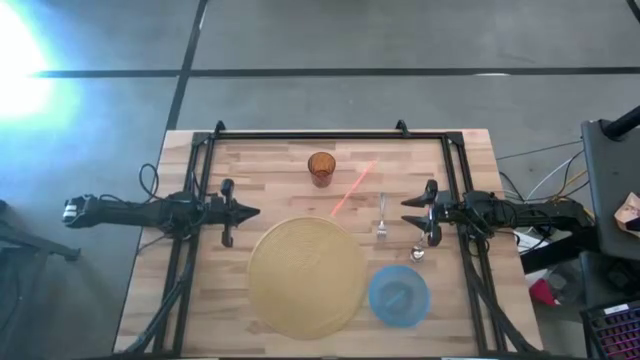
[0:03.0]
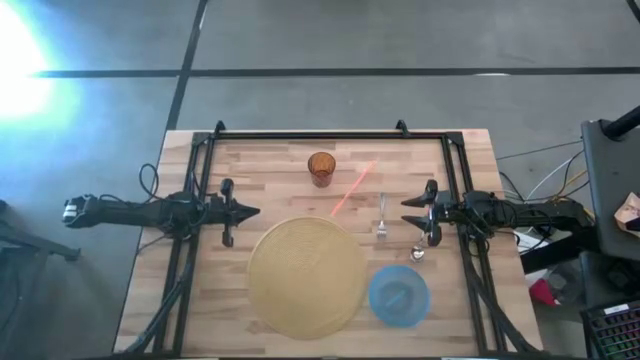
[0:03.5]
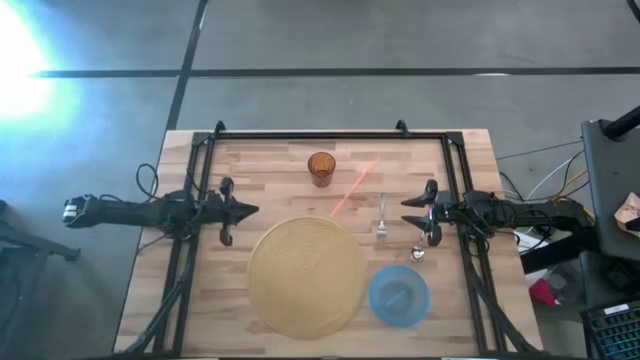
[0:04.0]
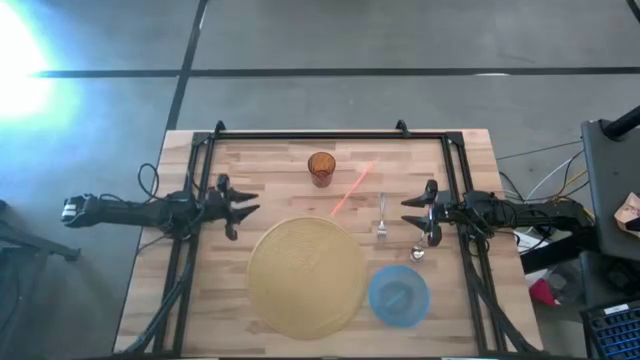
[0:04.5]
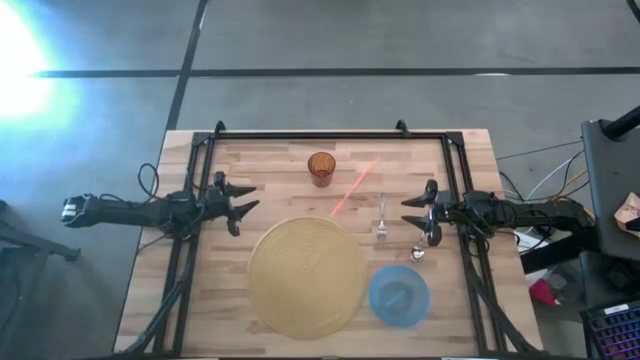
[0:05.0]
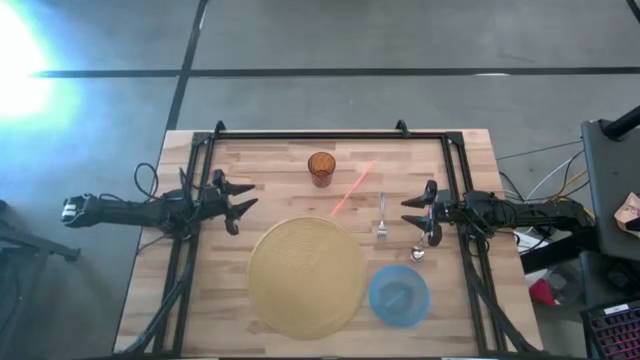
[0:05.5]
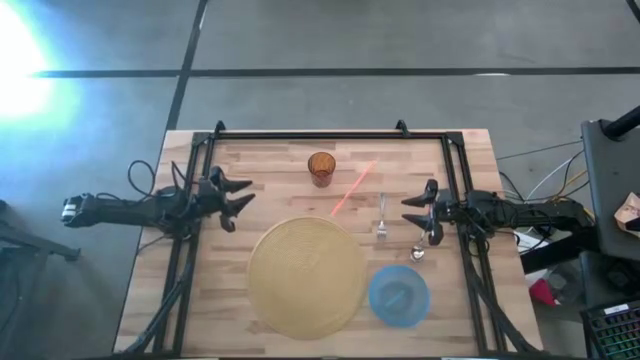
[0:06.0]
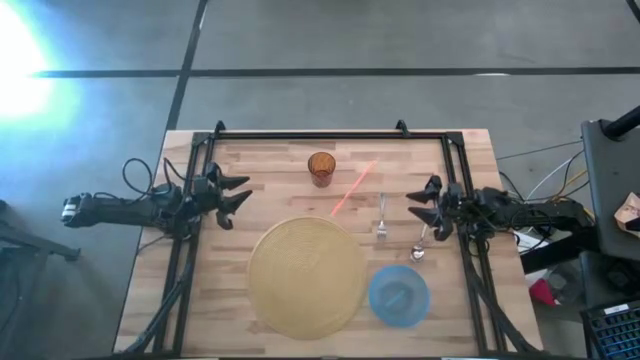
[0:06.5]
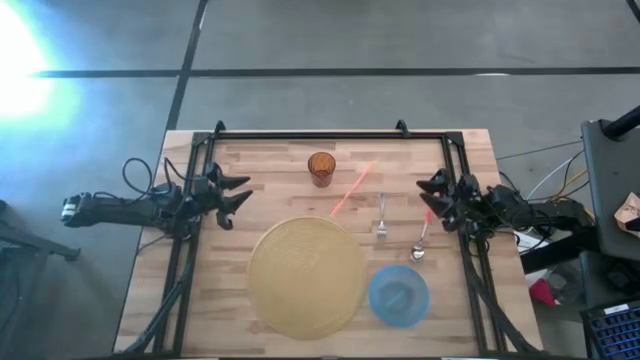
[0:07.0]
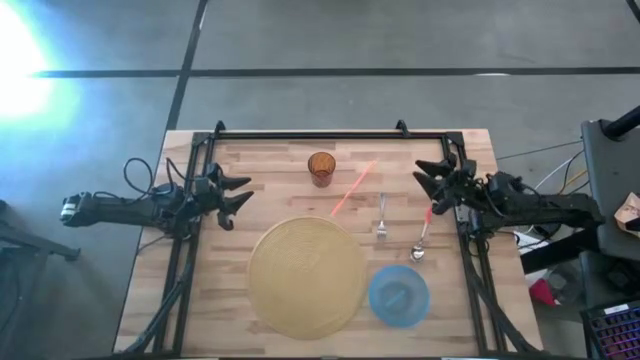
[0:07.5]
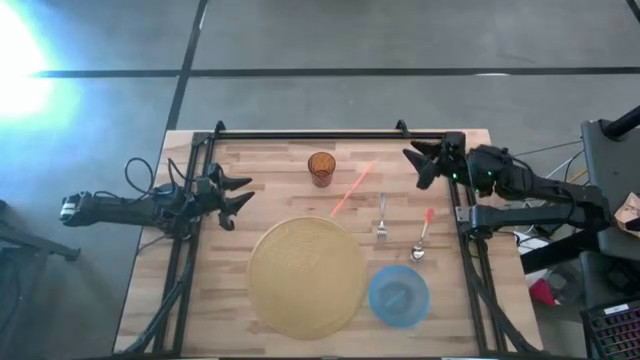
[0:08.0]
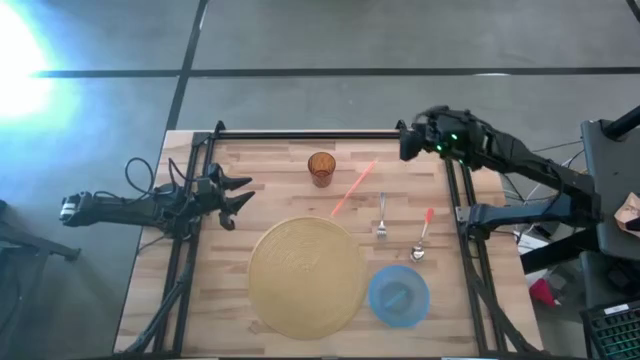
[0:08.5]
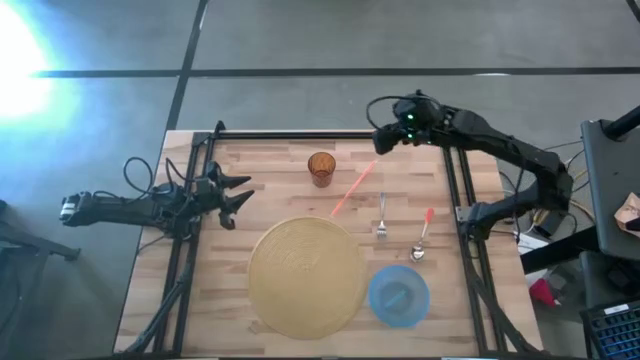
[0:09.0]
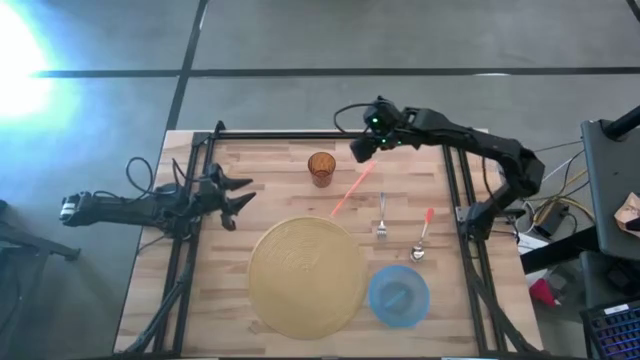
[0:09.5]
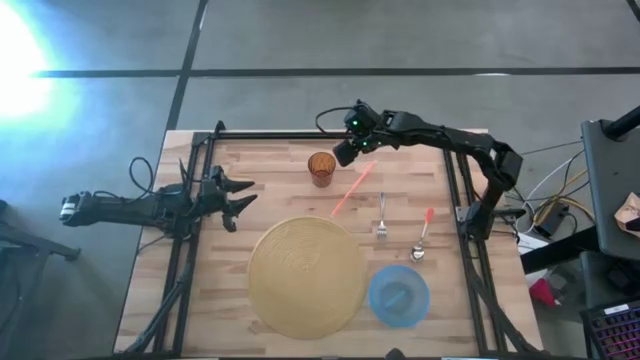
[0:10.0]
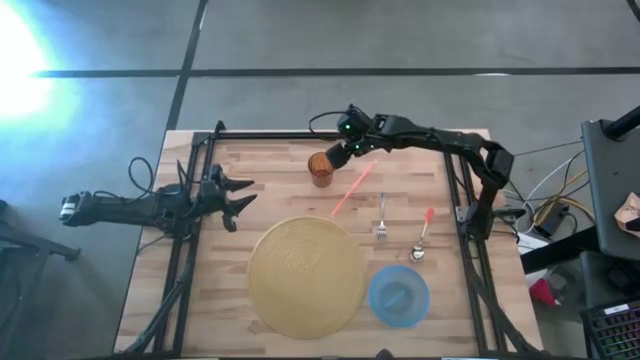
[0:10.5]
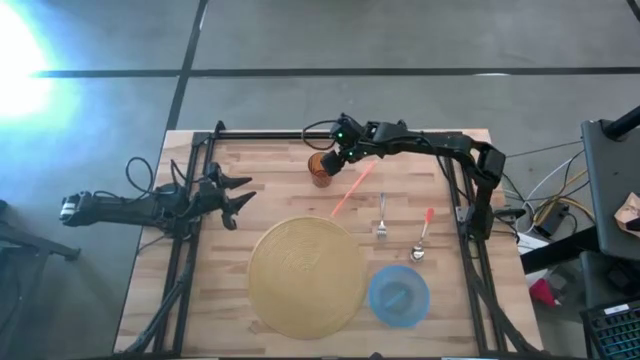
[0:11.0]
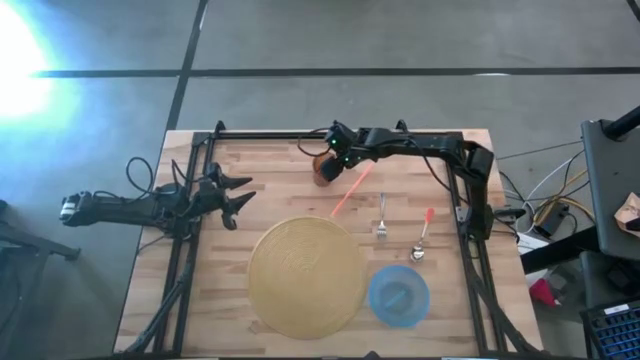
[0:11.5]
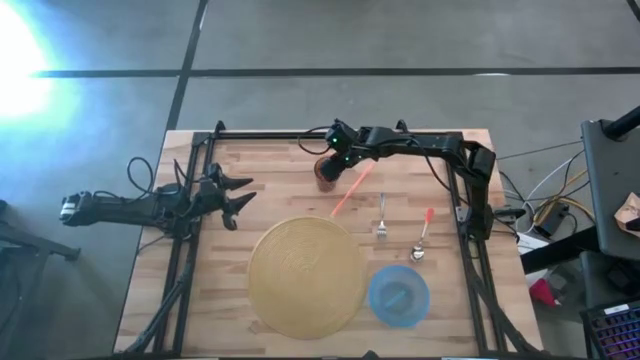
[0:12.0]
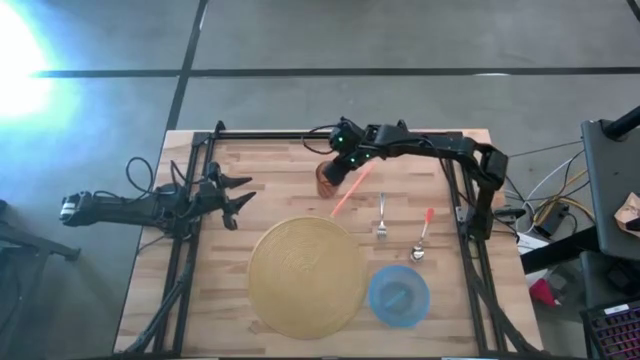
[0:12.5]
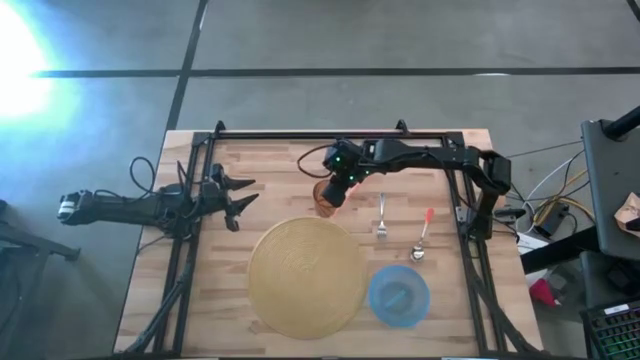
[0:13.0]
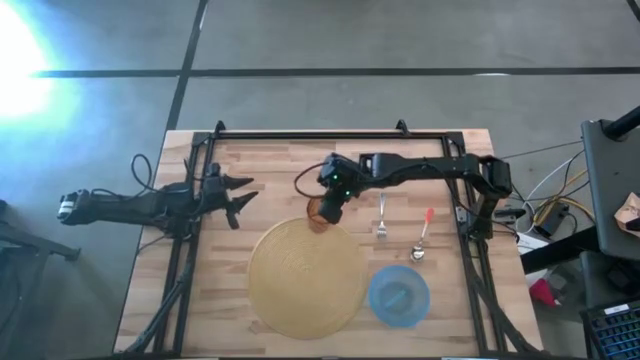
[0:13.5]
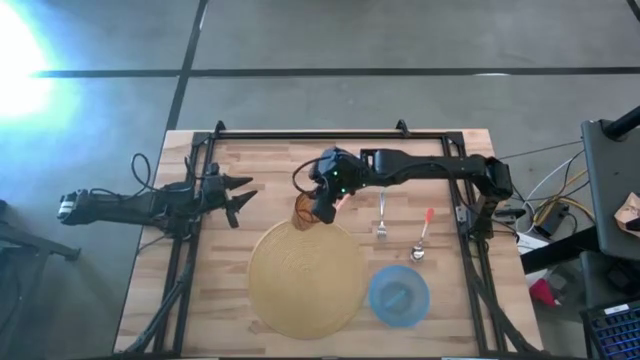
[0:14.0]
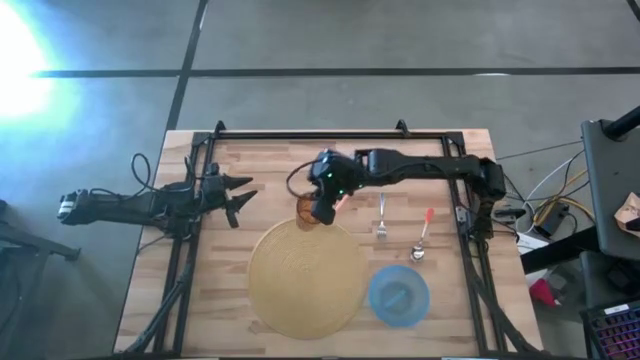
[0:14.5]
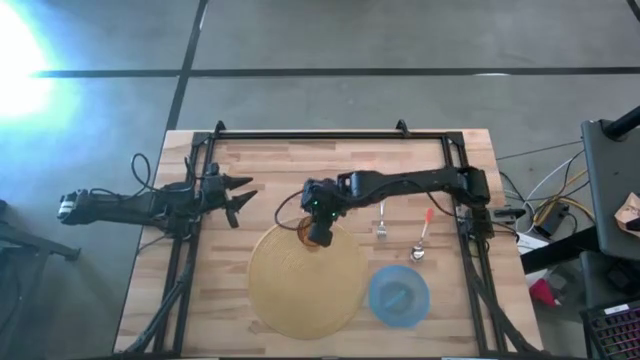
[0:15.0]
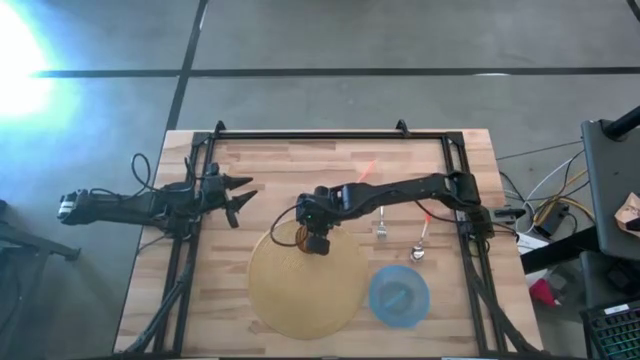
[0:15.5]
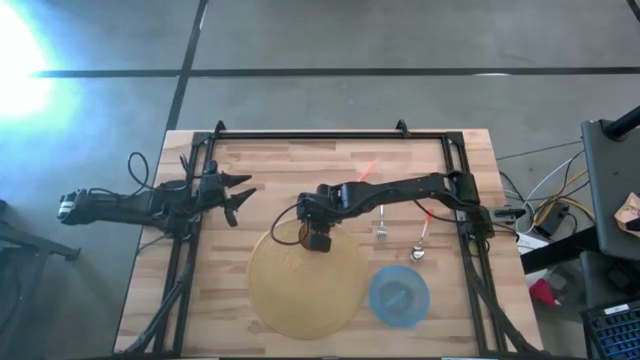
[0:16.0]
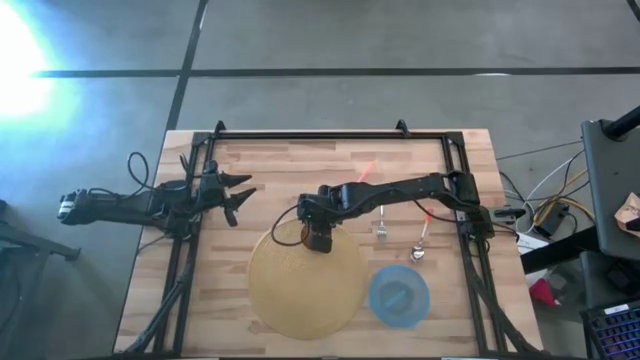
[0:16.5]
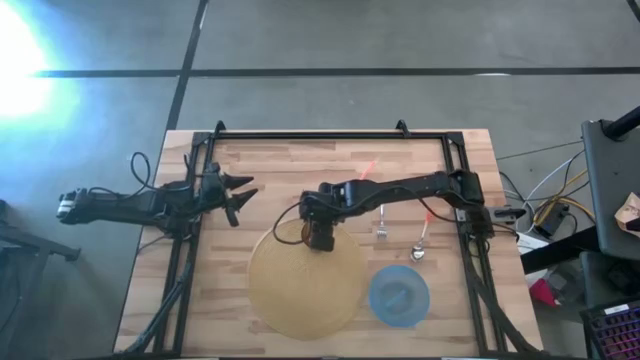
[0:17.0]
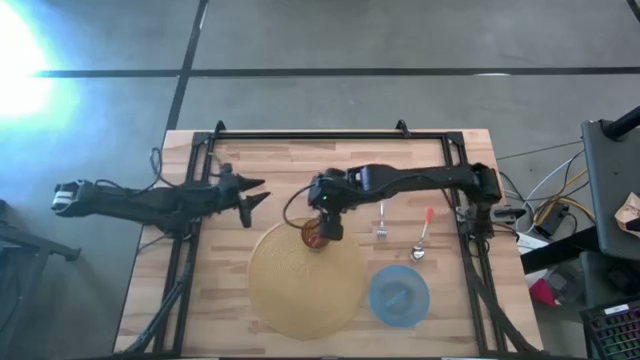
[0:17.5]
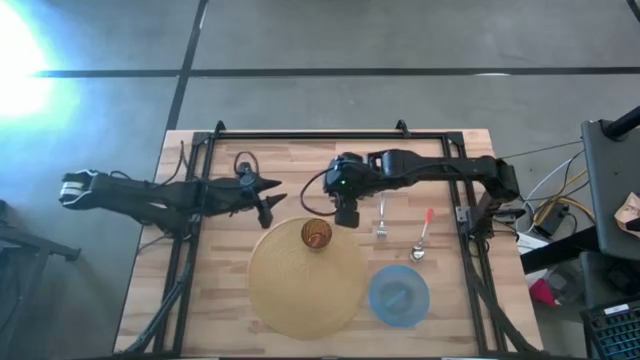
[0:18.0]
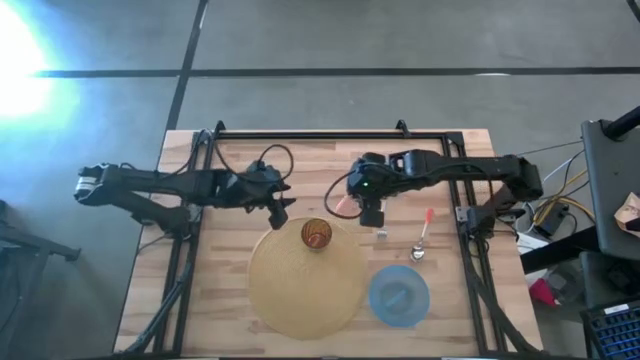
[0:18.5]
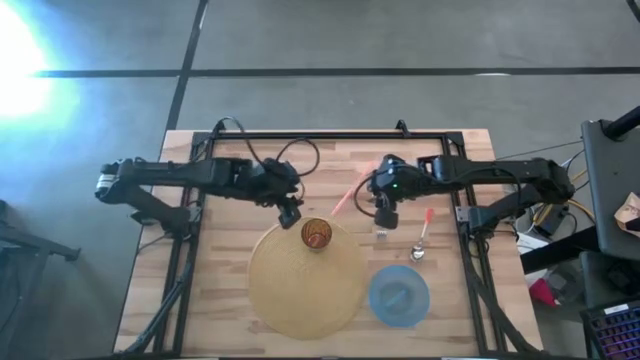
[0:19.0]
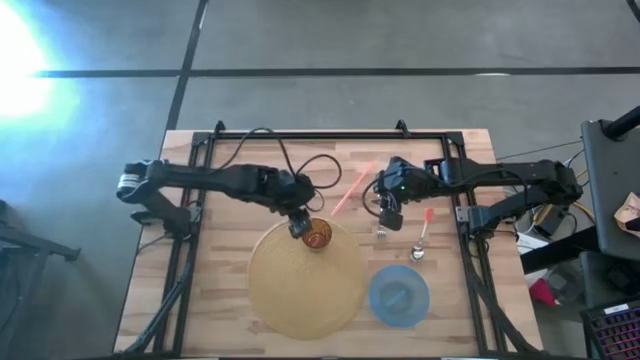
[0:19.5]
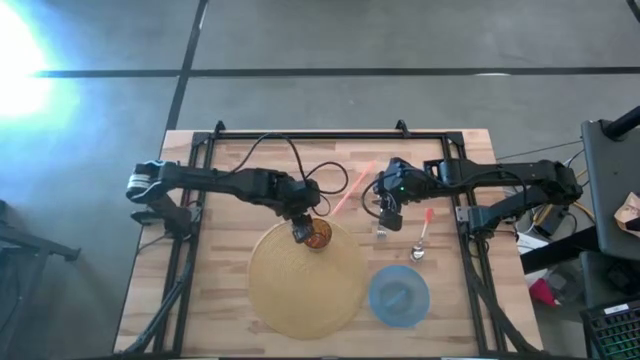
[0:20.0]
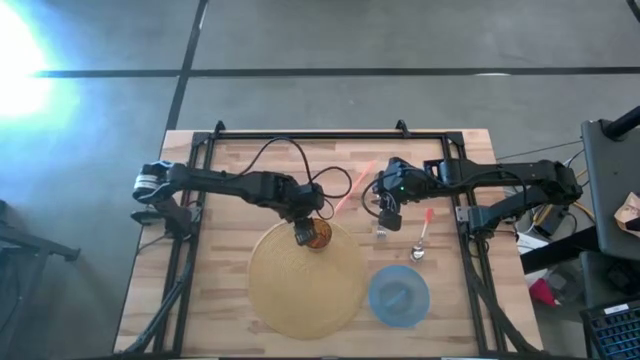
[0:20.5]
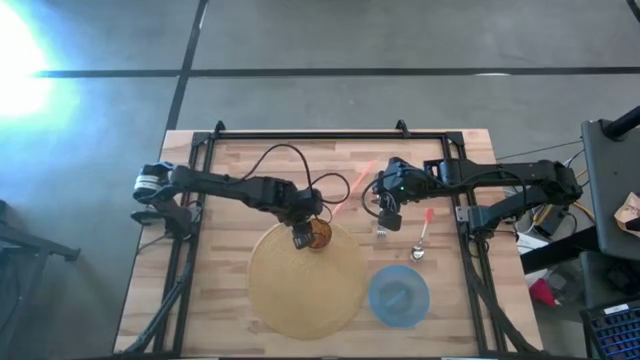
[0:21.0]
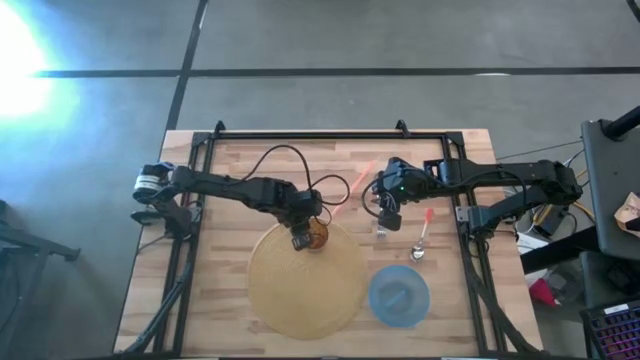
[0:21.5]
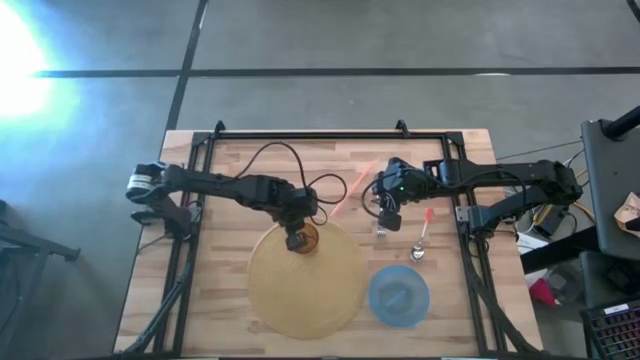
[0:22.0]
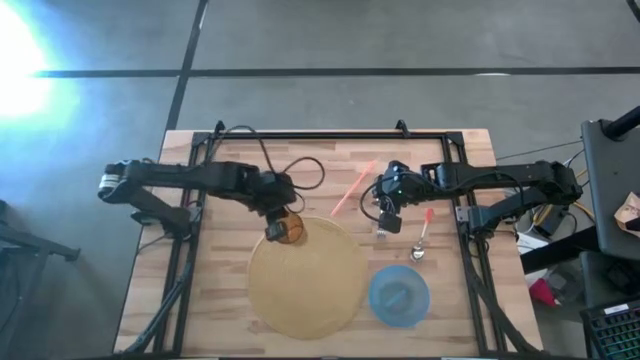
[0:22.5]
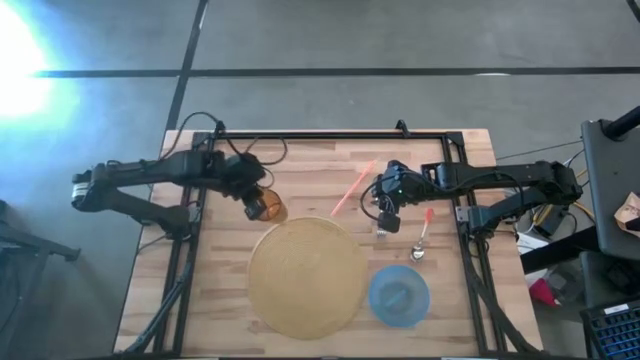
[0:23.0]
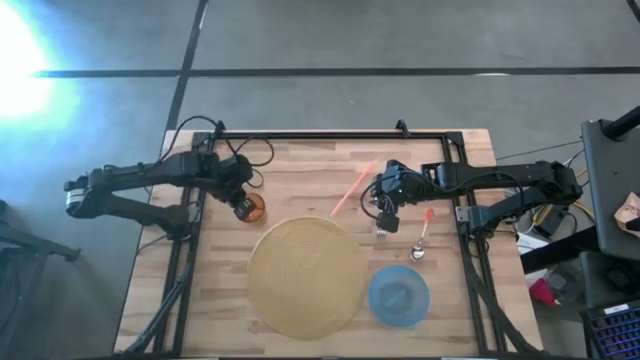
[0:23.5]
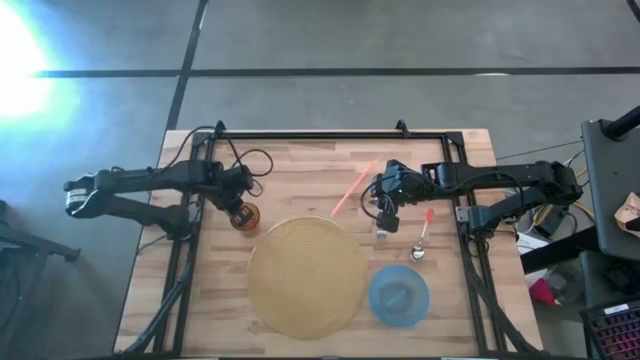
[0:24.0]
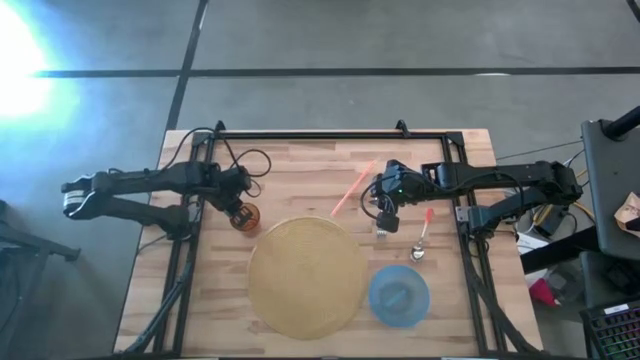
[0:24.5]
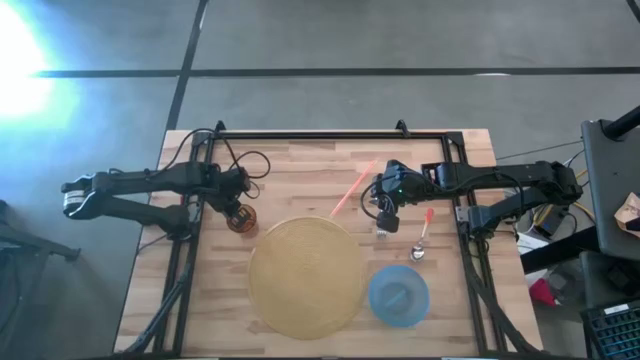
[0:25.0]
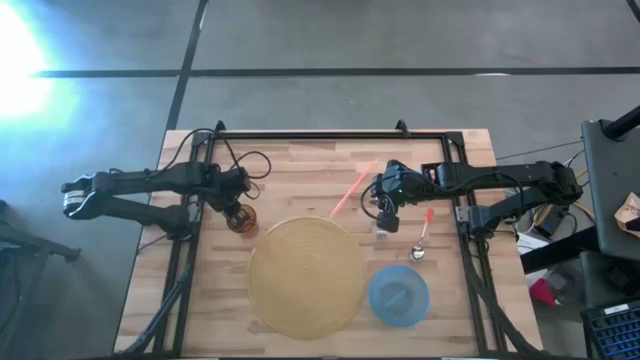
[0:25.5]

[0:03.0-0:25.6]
Task: Pick & Place Utensil
Put the brown cup to the top left of the brown mat
